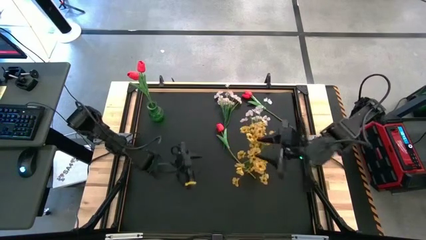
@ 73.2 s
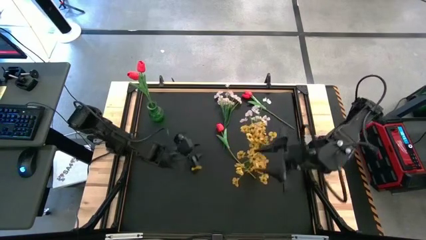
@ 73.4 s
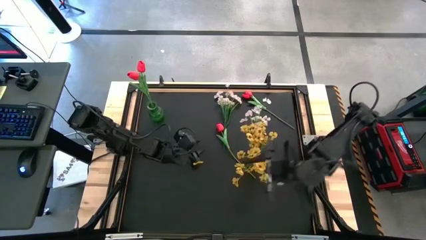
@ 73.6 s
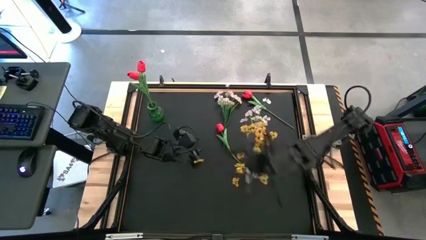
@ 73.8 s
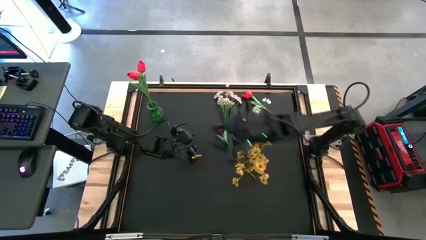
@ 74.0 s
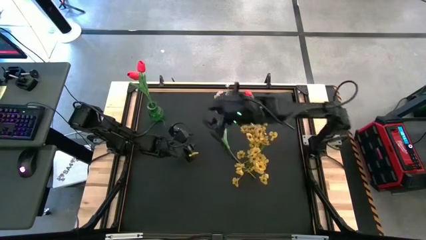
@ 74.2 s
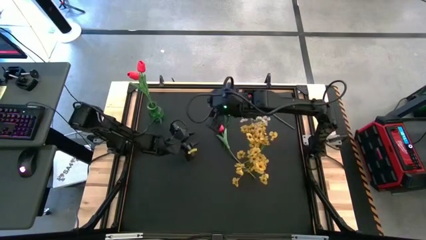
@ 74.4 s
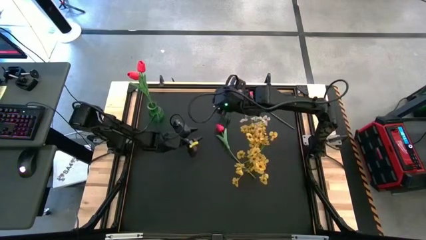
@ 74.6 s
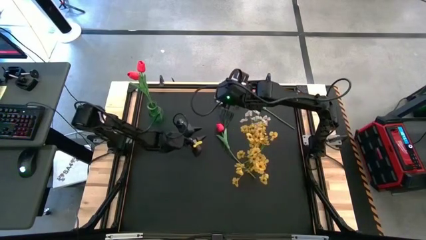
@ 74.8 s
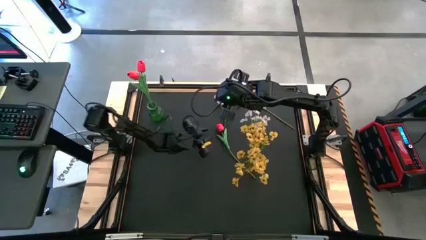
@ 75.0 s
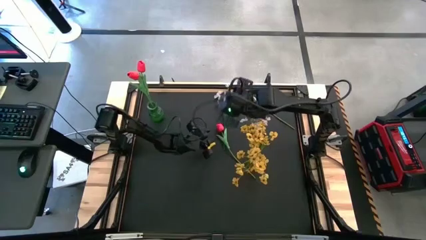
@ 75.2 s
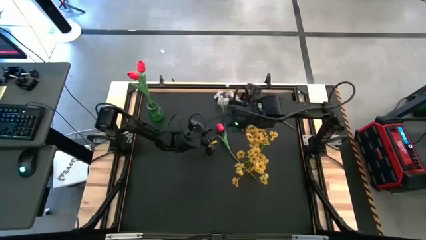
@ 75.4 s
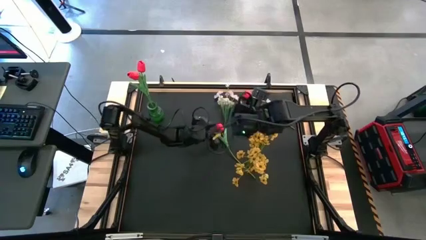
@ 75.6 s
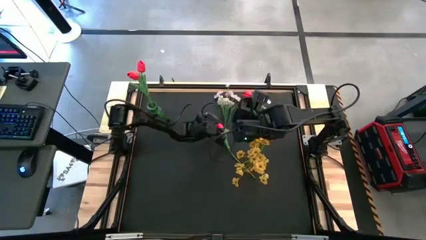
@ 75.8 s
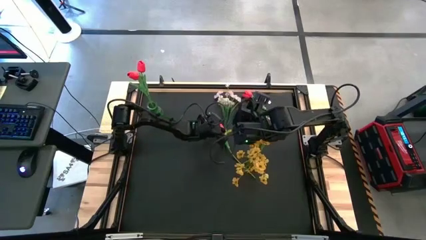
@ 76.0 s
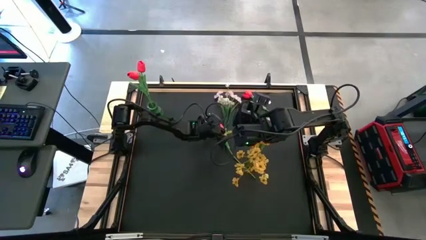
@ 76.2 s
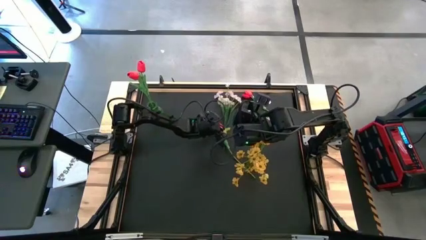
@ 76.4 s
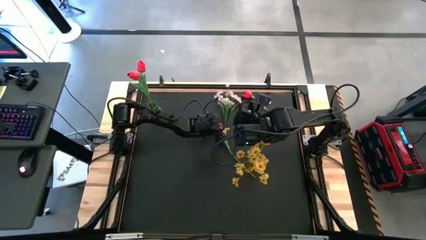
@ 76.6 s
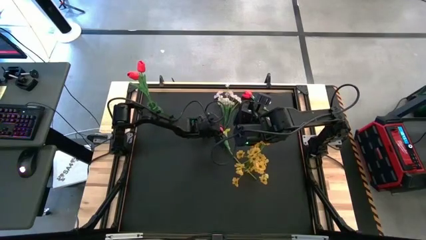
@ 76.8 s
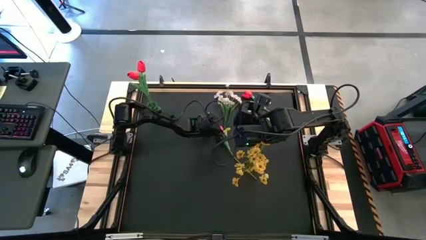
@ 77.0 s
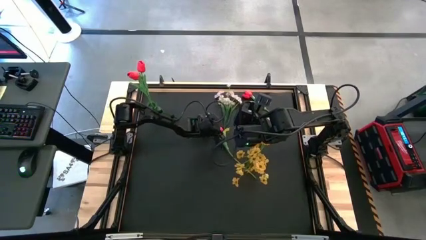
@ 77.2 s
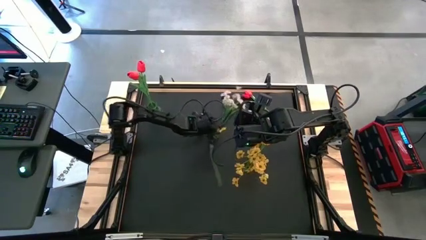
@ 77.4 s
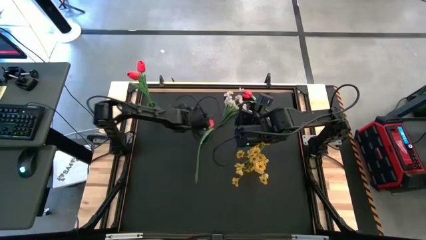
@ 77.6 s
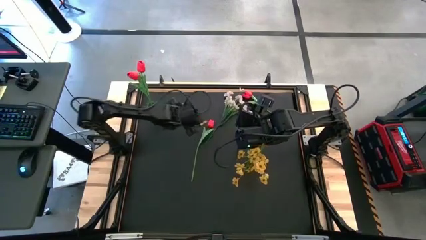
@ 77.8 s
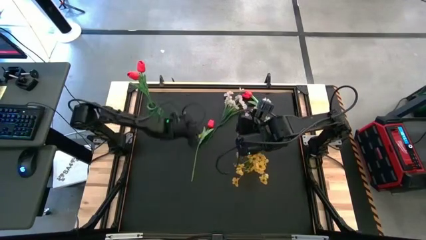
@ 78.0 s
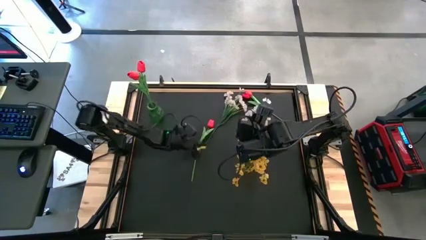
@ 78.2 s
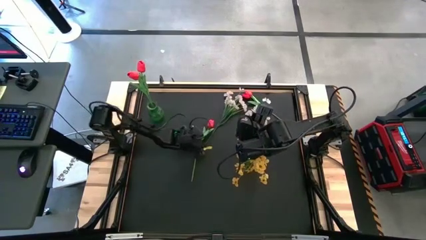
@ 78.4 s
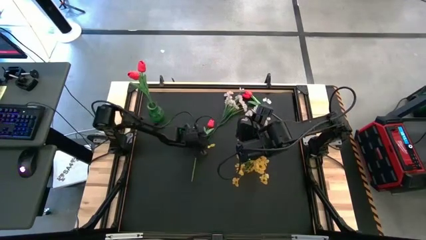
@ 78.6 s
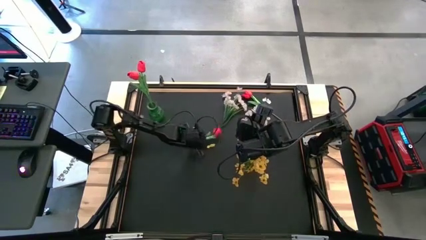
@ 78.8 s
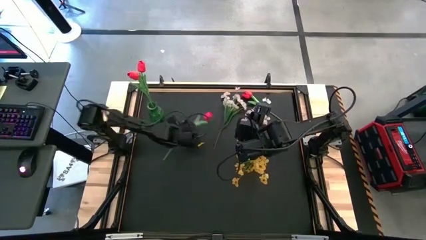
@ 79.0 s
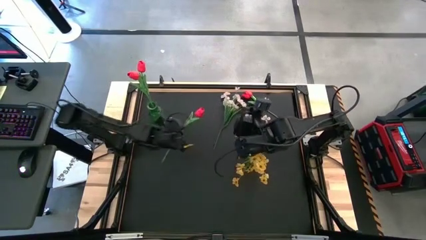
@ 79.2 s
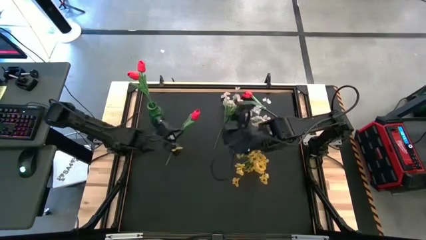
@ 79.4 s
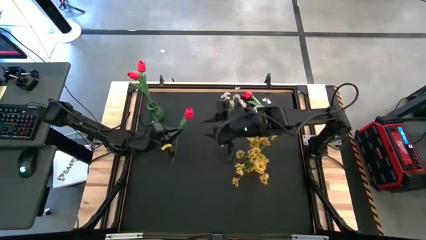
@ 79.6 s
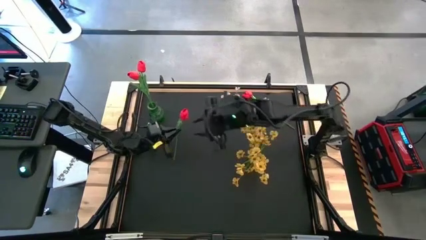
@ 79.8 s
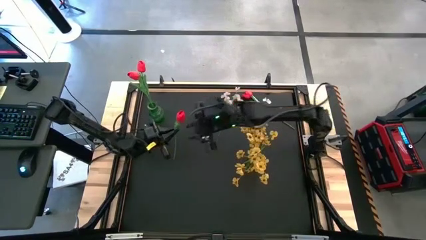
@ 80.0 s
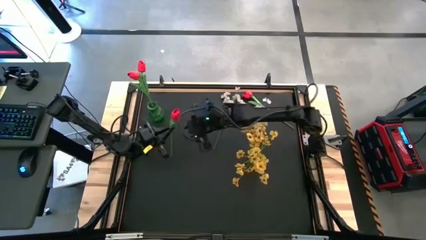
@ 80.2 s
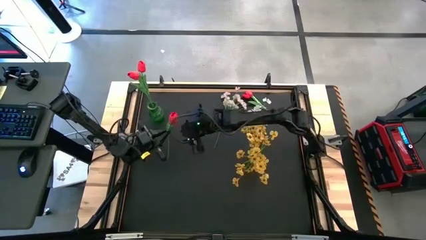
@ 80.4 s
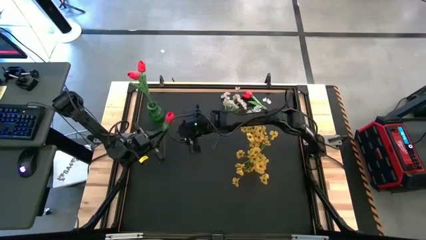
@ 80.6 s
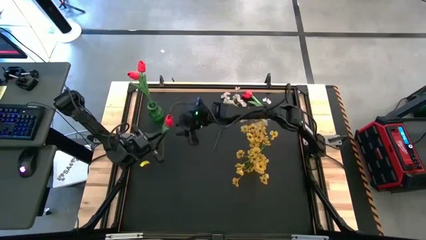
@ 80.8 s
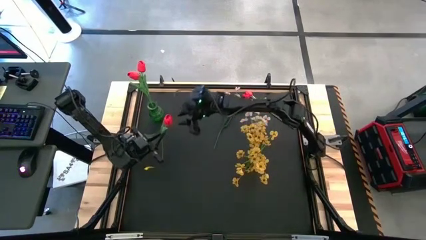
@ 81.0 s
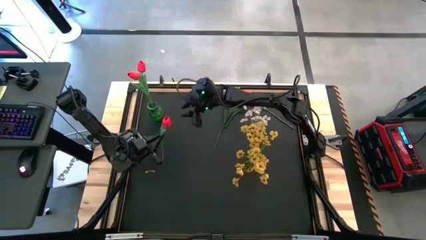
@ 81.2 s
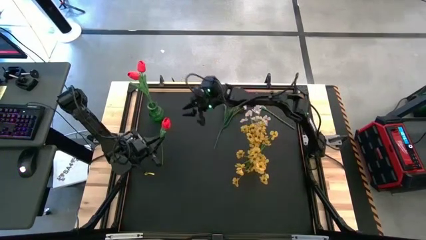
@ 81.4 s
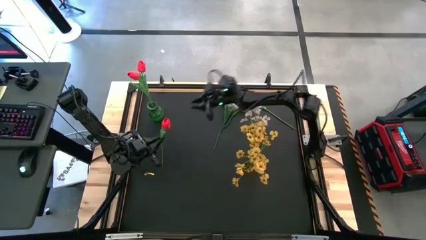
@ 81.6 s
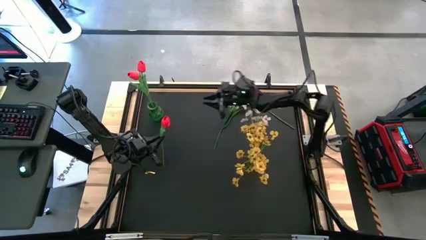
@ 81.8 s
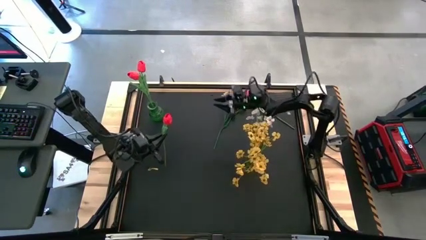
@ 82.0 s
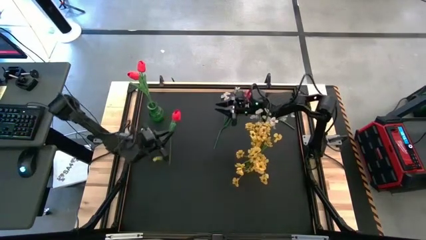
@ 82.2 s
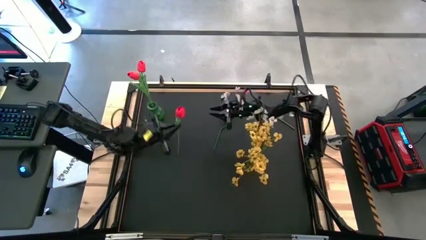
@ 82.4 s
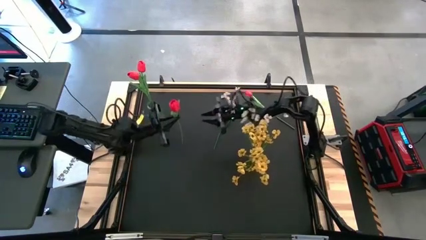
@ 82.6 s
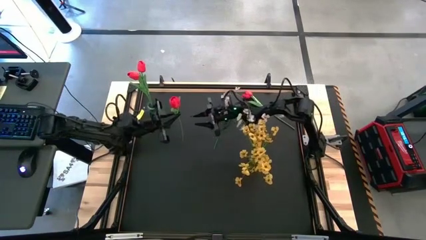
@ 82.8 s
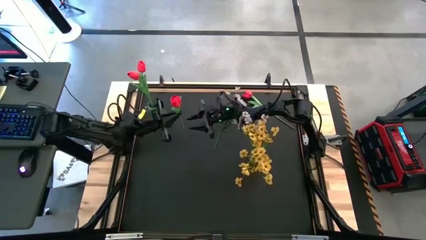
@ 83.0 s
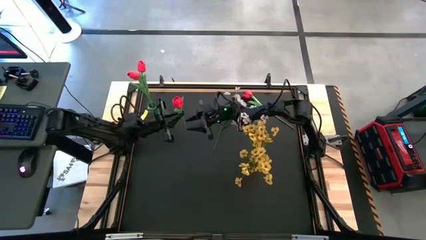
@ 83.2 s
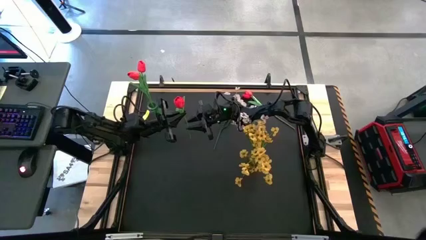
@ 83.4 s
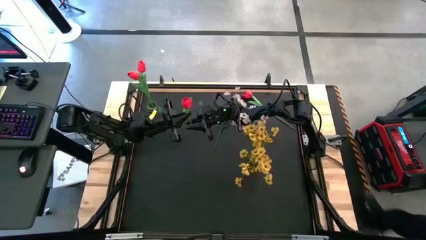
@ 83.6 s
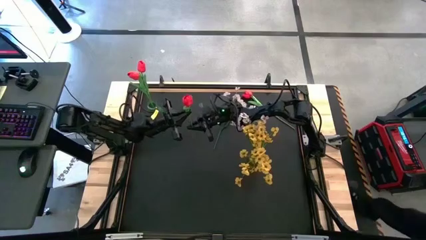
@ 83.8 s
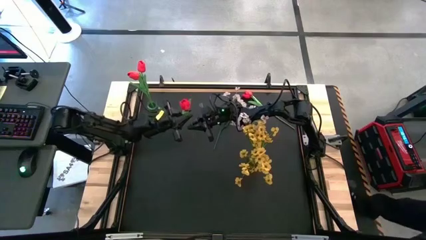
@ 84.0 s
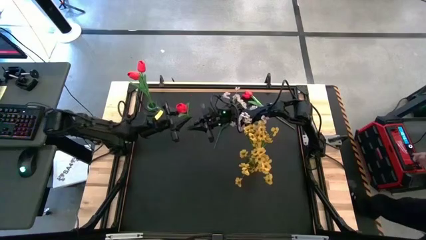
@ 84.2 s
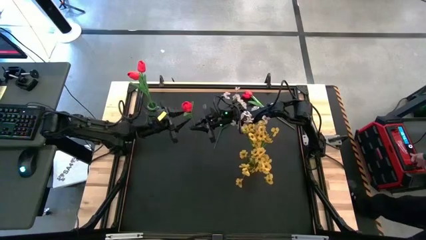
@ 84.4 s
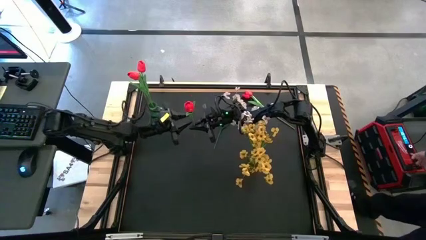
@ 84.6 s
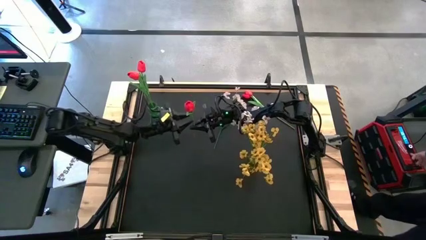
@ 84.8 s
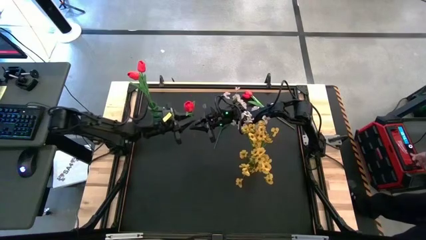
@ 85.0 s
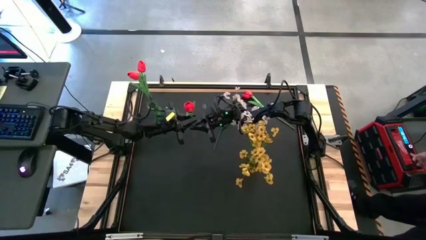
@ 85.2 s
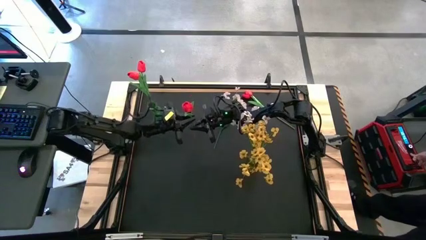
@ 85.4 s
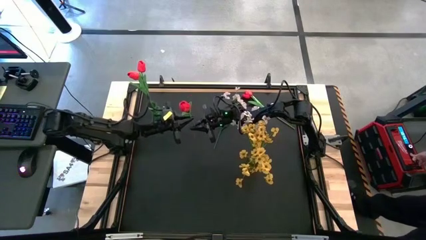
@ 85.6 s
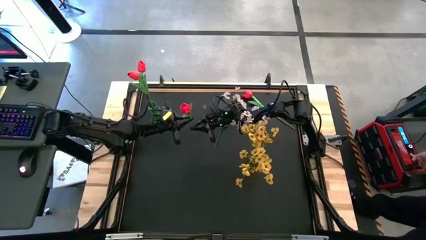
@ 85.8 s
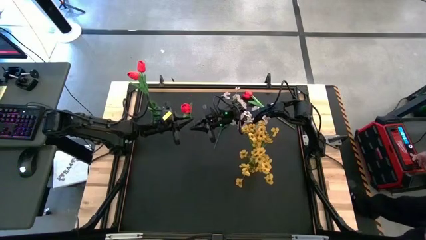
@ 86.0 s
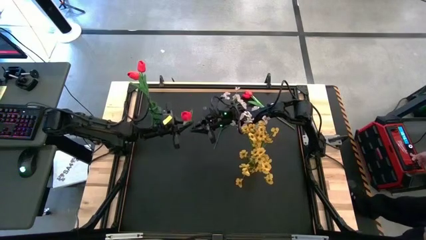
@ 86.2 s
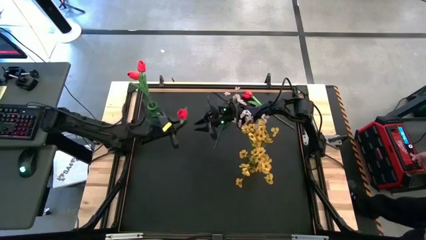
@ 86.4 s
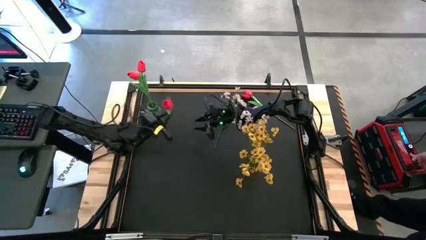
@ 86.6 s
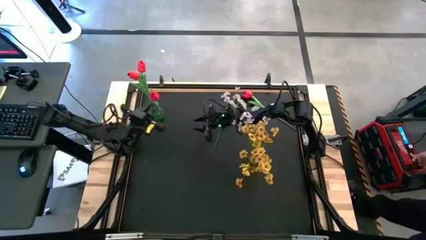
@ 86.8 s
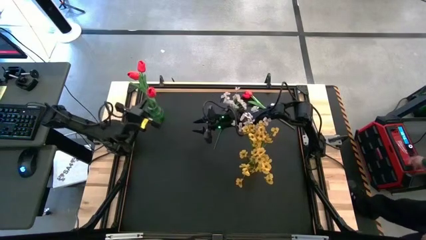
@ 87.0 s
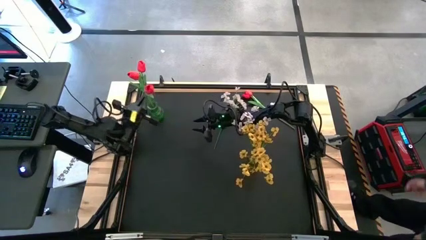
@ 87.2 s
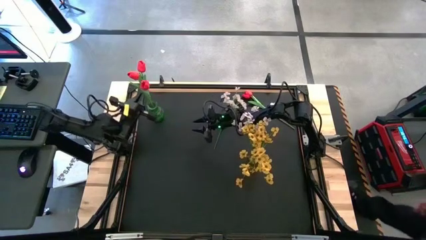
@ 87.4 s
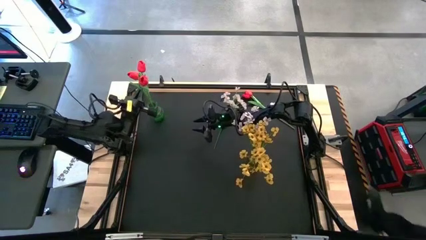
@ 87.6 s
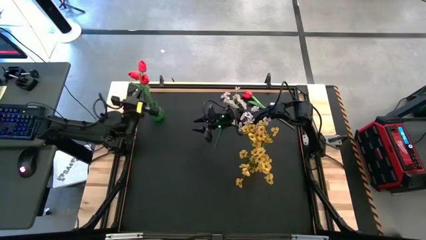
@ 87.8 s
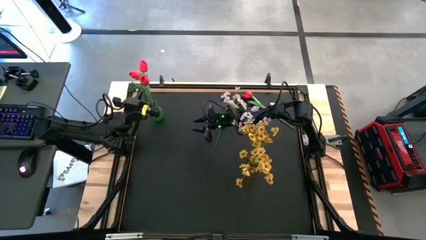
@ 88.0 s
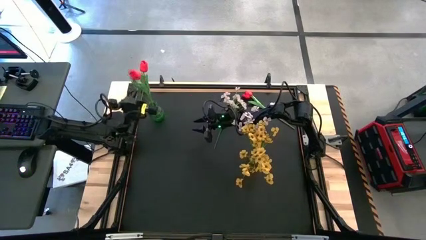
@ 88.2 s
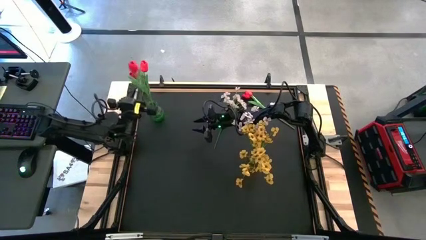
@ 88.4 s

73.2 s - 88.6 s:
Task: Sort flowers into vase by color
Put the red tulip into the green vase

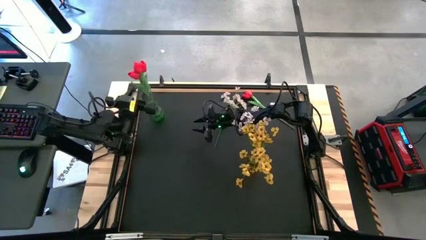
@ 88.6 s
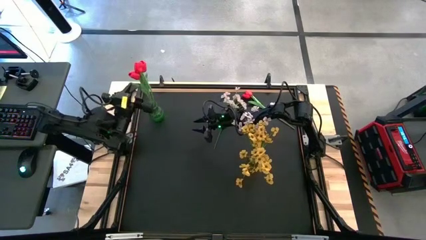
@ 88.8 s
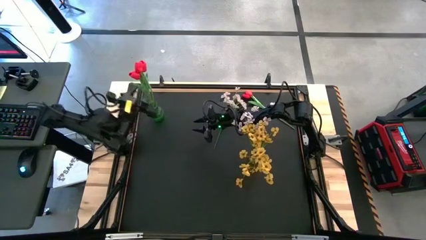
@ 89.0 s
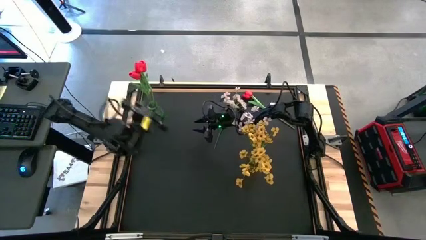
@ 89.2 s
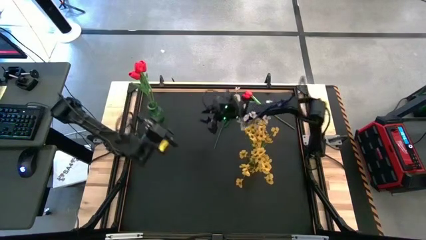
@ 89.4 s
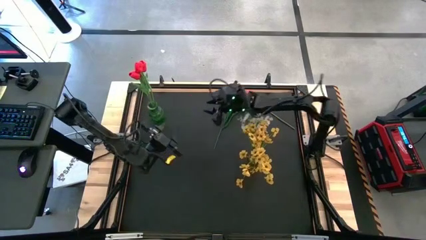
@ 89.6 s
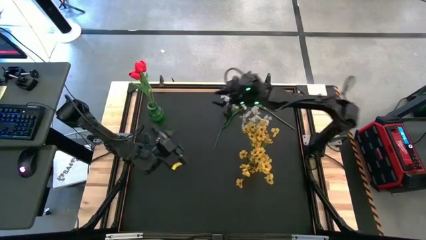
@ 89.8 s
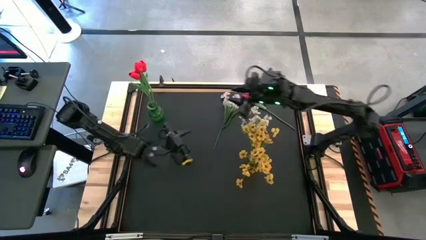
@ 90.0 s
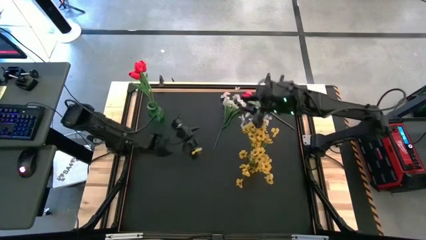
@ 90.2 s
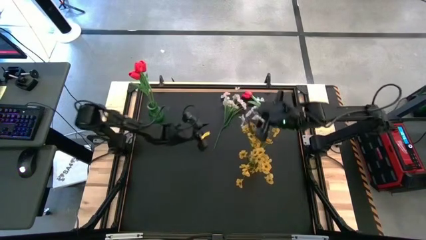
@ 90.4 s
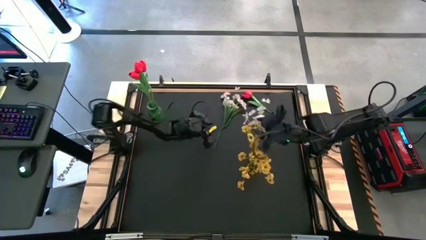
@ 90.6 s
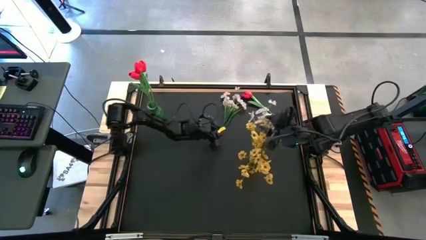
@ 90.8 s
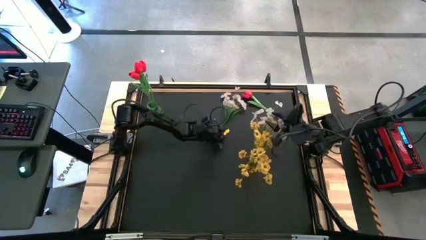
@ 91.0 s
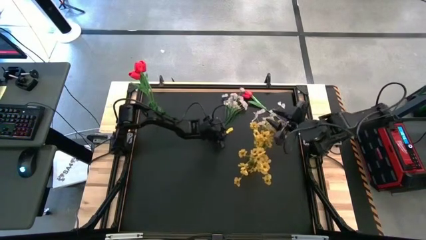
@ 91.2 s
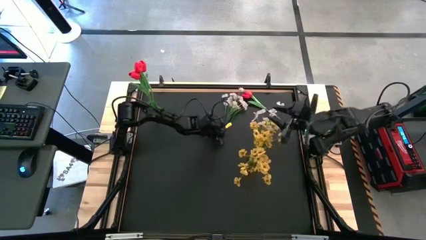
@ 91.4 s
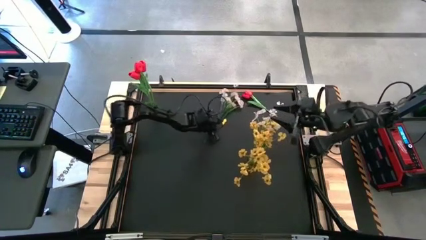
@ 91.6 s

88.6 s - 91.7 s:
Put the white flower into the yellow vase
